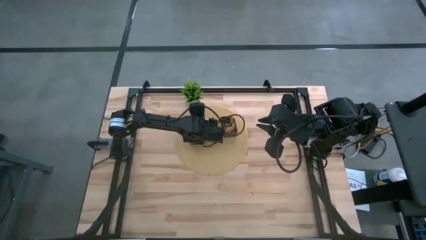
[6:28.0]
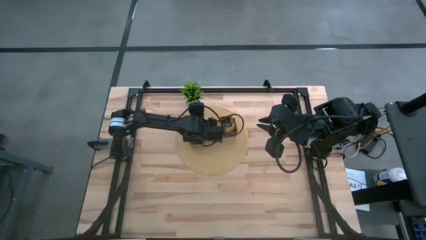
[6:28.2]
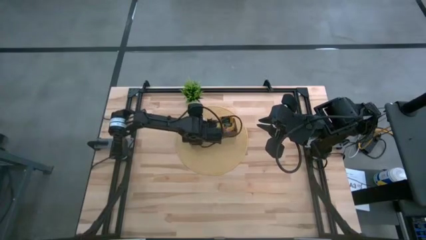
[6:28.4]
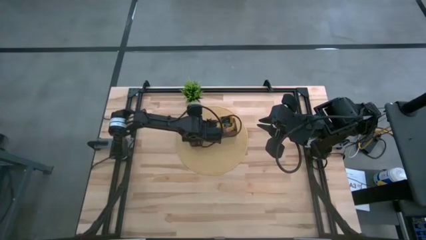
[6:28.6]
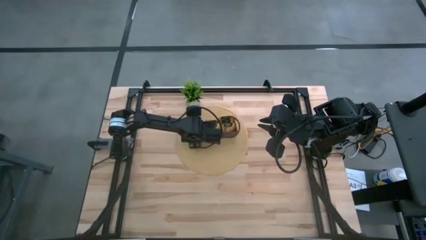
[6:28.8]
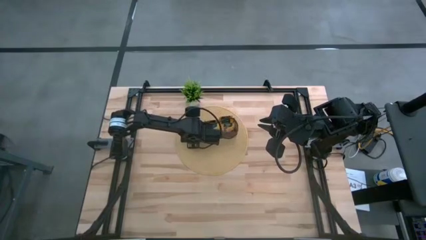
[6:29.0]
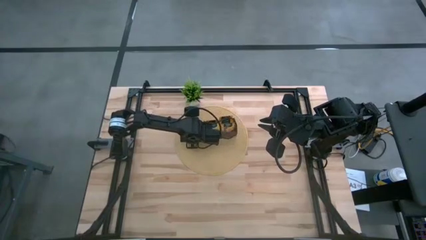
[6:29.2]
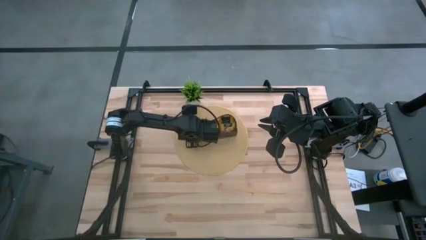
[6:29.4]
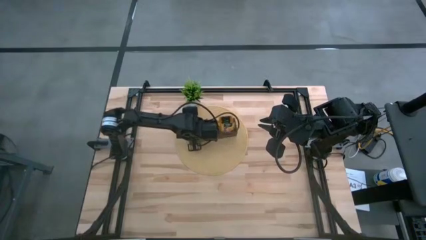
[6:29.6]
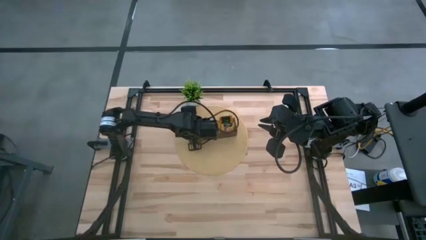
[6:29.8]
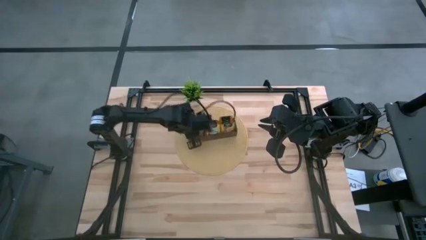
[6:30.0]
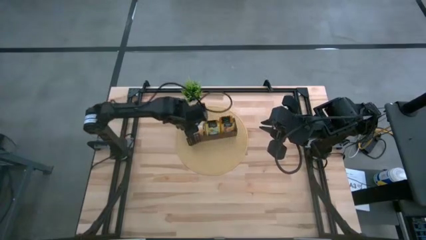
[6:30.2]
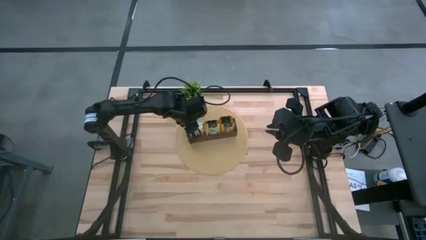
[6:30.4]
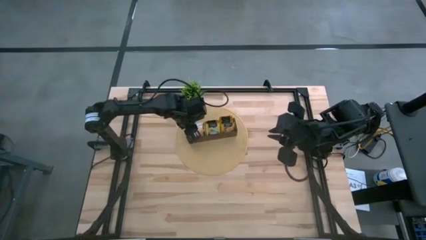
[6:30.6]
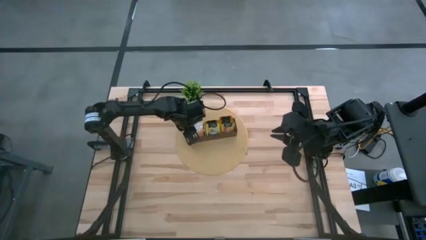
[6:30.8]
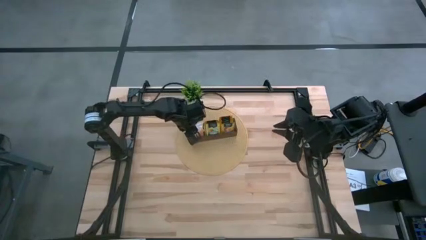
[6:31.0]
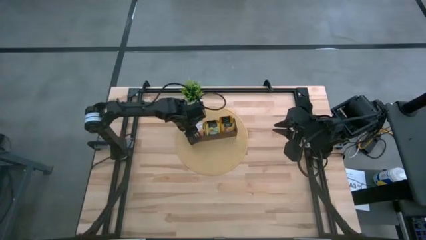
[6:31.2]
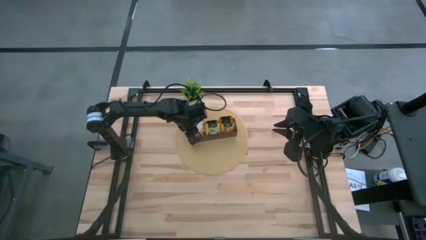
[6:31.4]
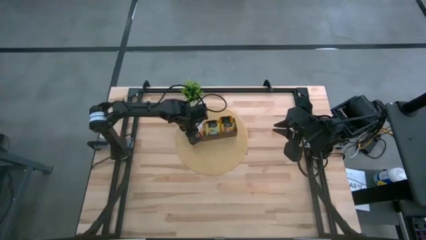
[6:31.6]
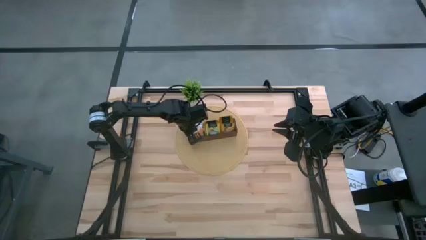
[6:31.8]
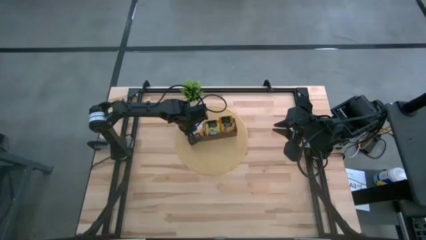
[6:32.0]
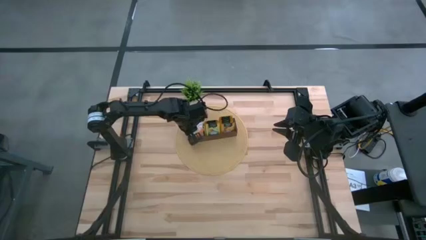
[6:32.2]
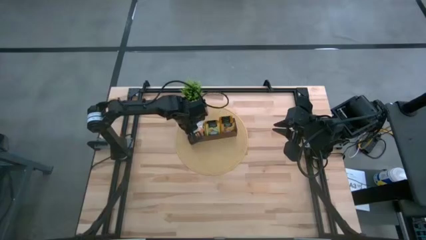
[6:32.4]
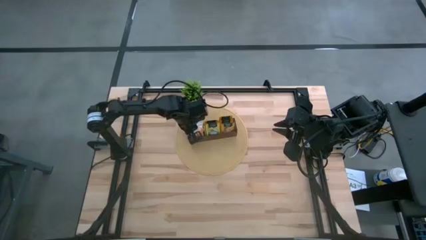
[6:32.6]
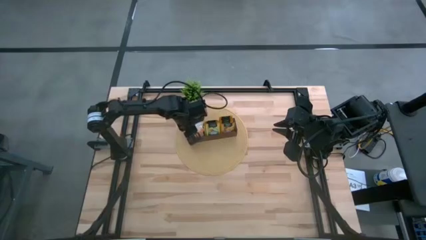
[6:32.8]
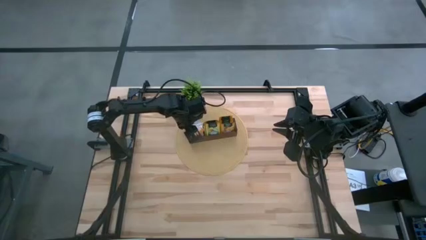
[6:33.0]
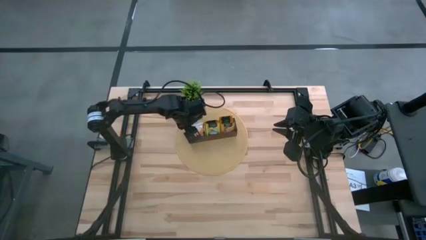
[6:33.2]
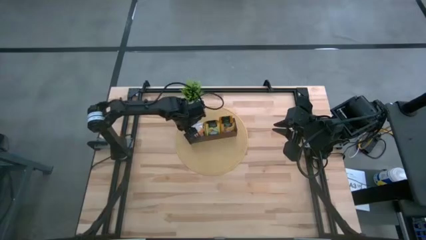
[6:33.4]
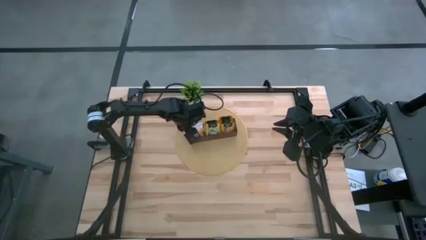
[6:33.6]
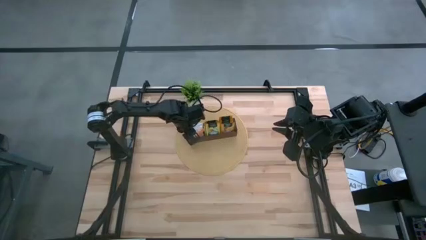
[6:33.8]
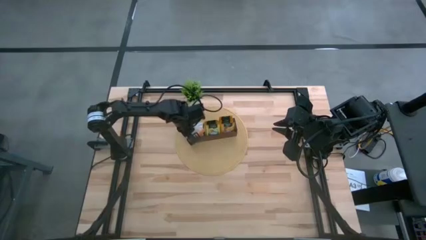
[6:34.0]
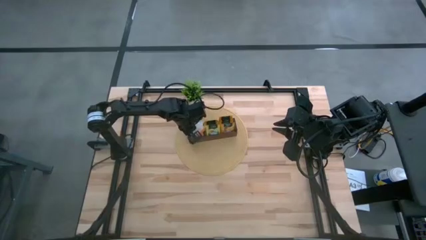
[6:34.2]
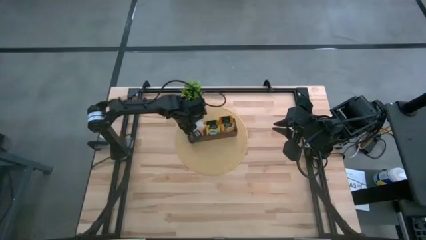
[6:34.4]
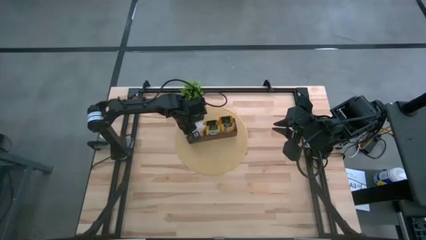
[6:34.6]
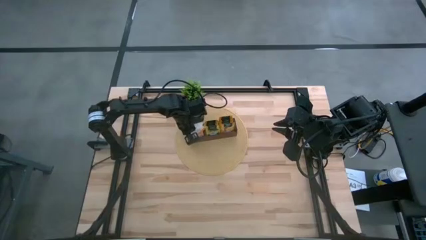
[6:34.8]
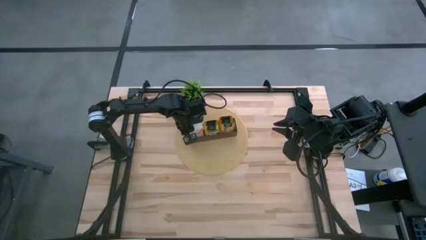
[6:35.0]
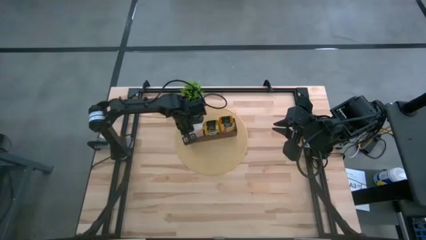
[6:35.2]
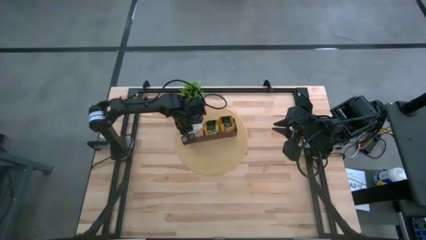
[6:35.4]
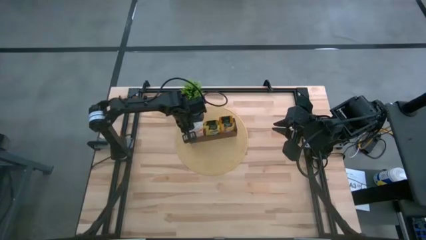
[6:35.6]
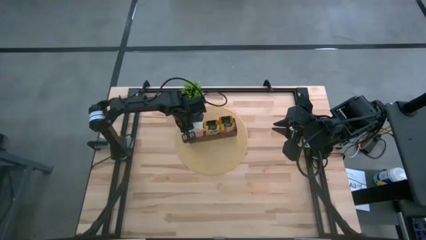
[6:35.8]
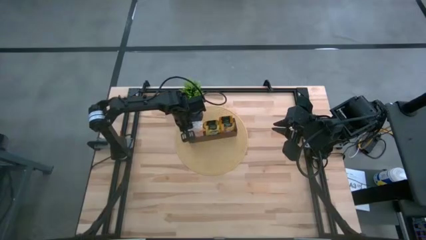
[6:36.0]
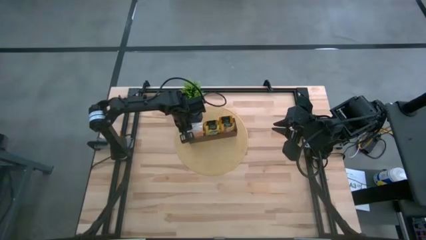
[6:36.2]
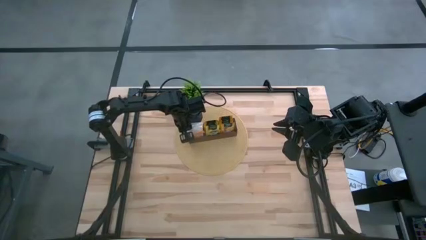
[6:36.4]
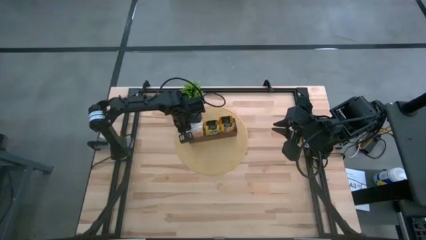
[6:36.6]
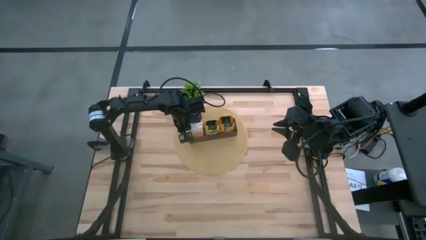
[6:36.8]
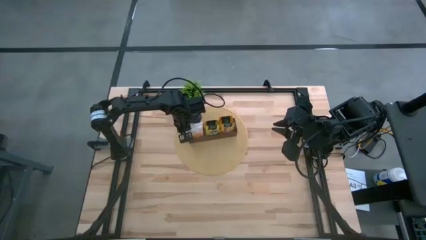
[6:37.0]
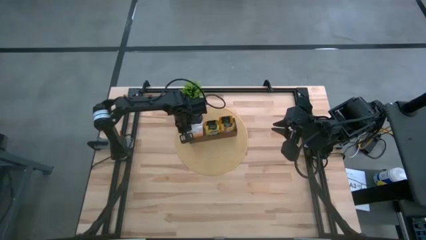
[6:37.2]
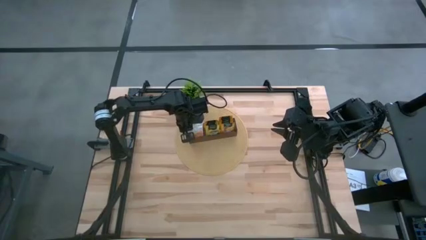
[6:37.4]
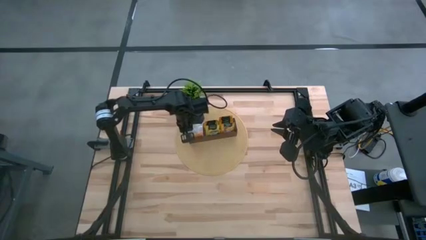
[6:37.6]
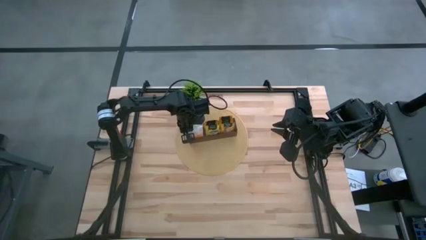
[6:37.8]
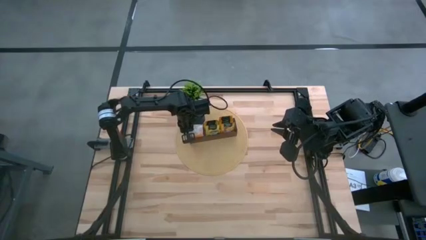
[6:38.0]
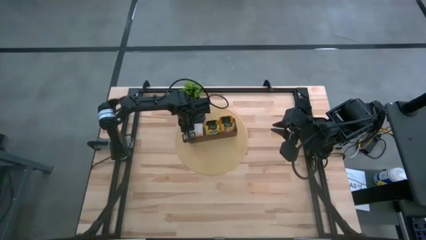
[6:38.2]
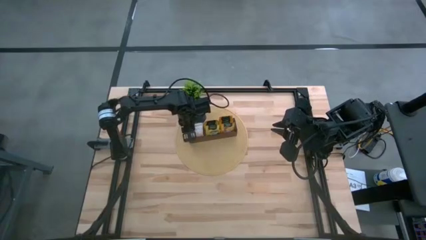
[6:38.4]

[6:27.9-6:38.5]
Task: Pick & Place Tea
Put the white tea bag into the left section of the wooden organizer

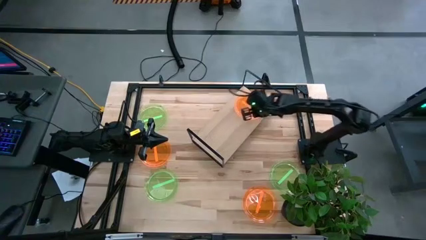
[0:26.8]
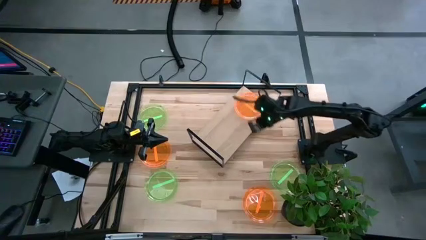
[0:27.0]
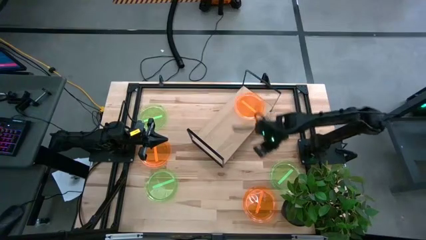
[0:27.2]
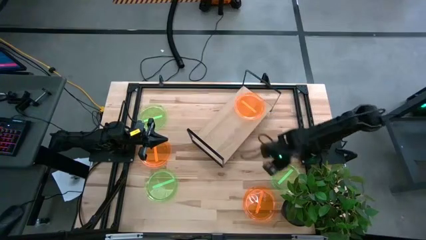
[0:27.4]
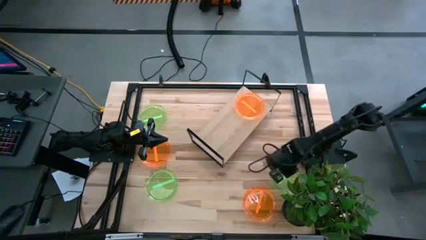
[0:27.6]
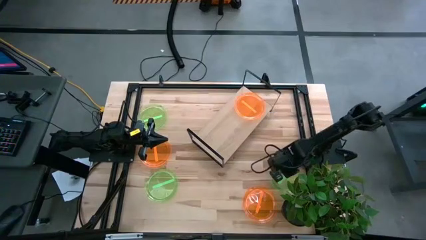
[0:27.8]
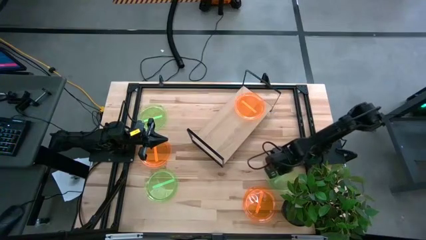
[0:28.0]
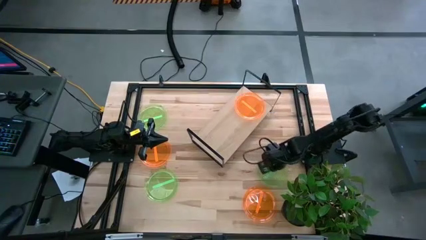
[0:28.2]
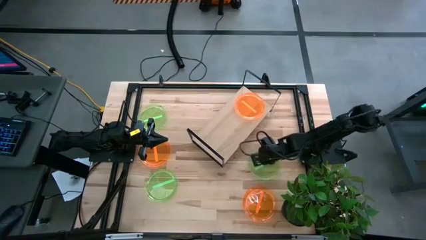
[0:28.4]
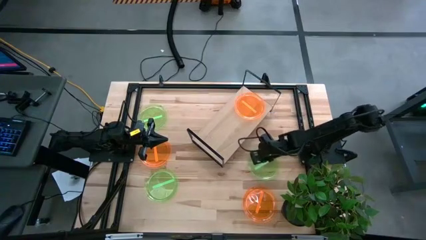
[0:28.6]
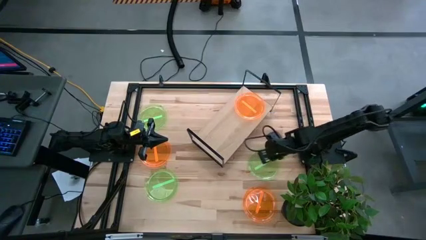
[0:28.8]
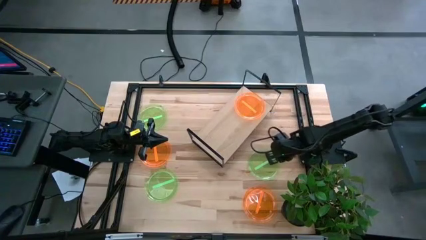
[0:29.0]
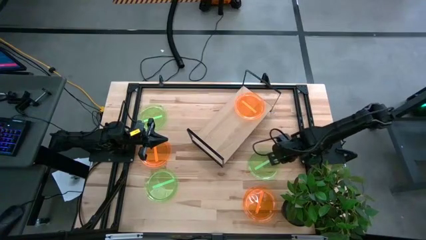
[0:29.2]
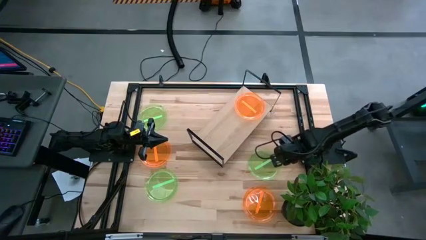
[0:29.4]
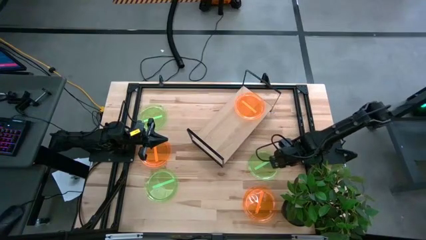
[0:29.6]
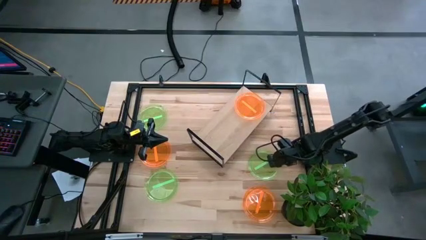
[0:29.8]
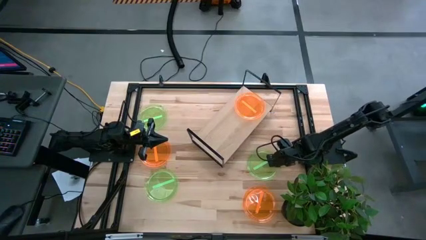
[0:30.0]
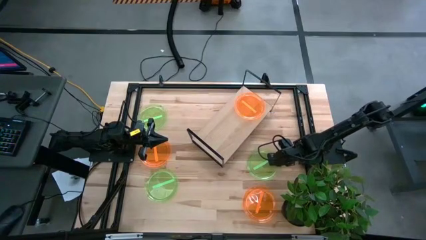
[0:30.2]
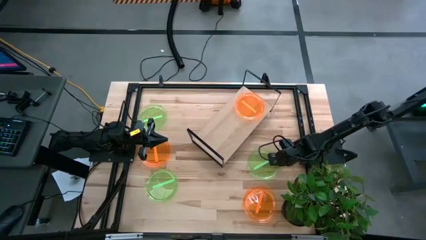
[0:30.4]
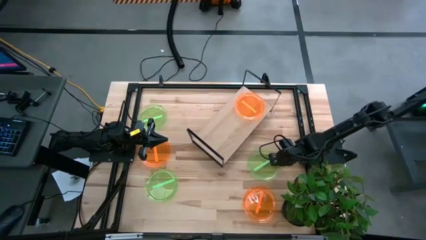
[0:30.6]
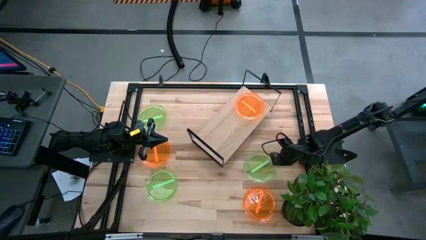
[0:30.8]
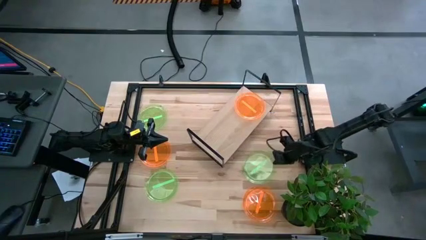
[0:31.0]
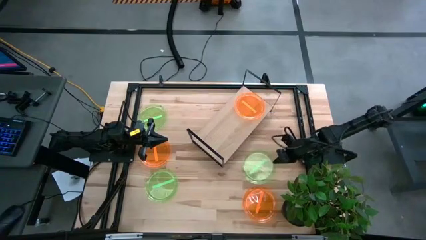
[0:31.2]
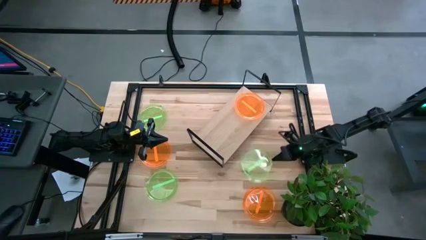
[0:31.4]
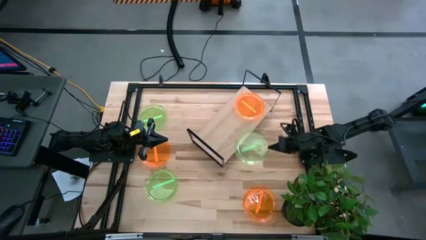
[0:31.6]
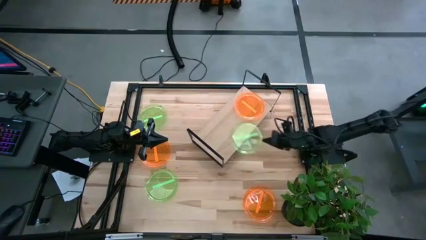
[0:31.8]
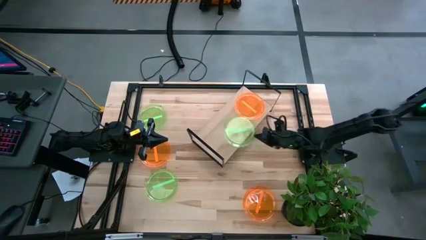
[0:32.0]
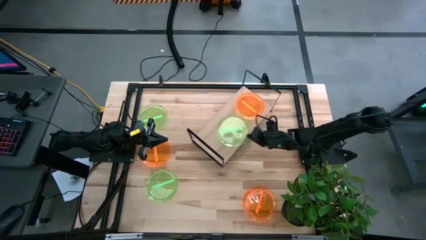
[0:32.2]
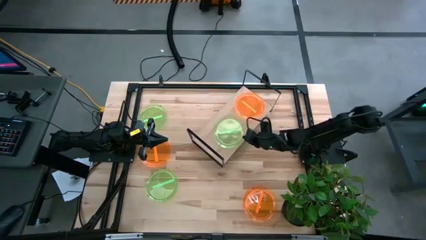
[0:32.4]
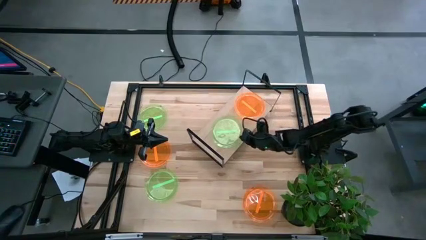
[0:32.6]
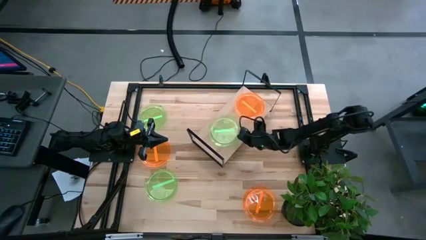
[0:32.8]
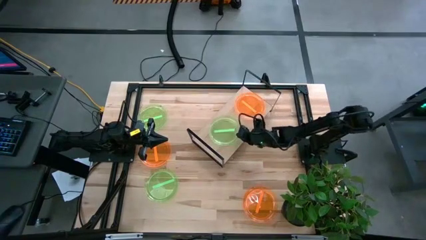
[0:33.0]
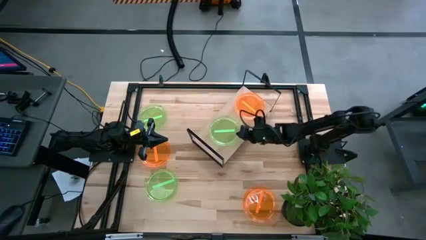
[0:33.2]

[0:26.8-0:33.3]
Task: Place and stack plates onto a shelf
Put the bottom right green plate on the shelf
